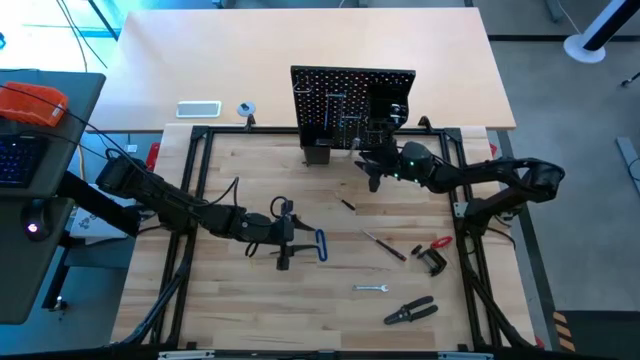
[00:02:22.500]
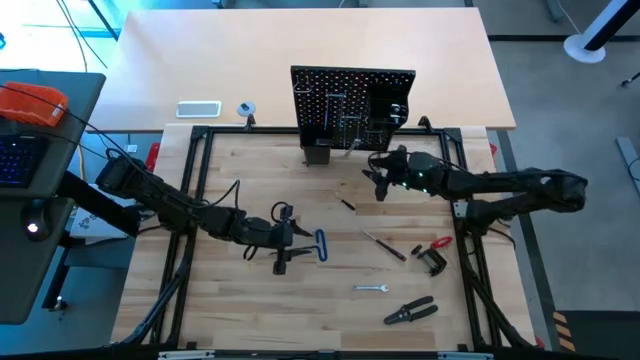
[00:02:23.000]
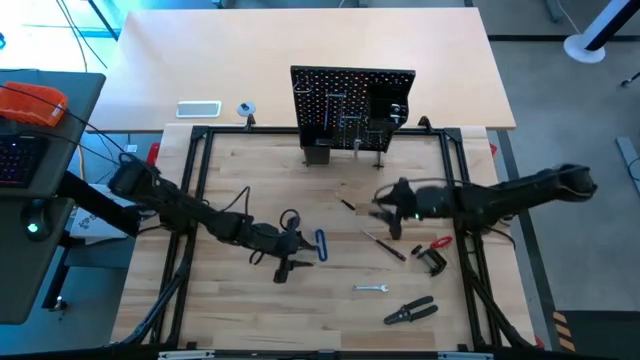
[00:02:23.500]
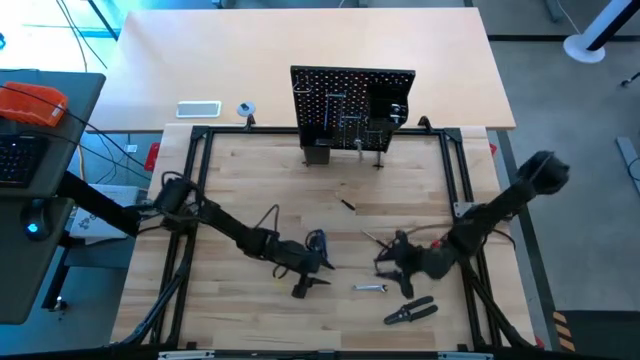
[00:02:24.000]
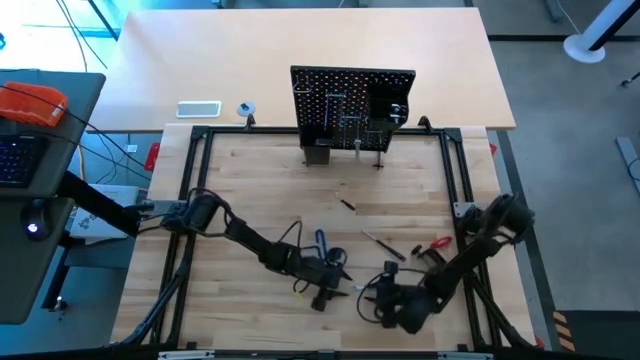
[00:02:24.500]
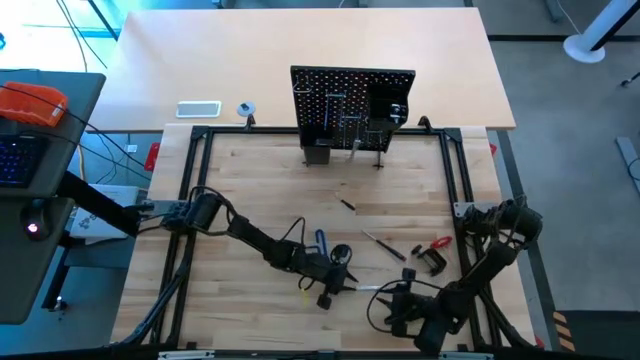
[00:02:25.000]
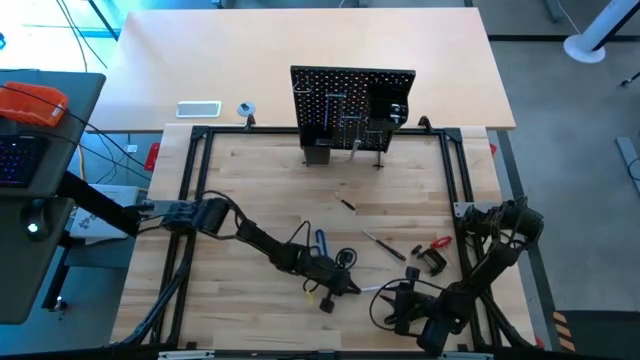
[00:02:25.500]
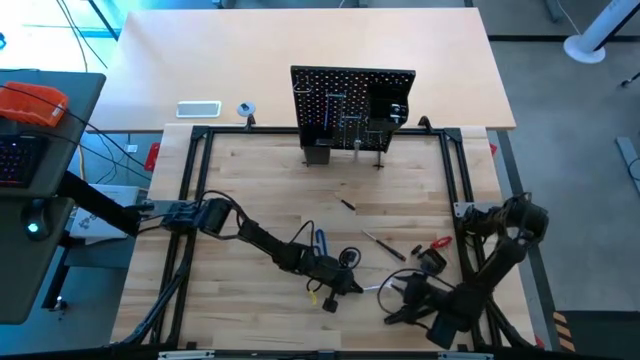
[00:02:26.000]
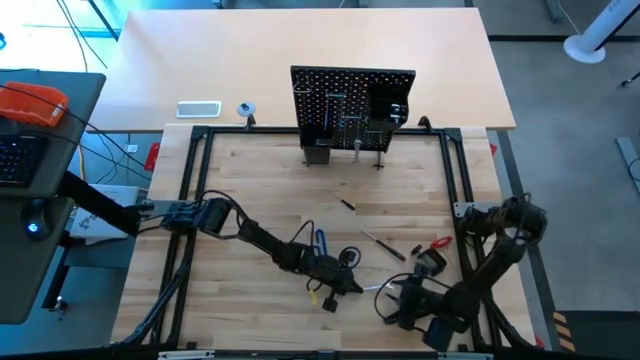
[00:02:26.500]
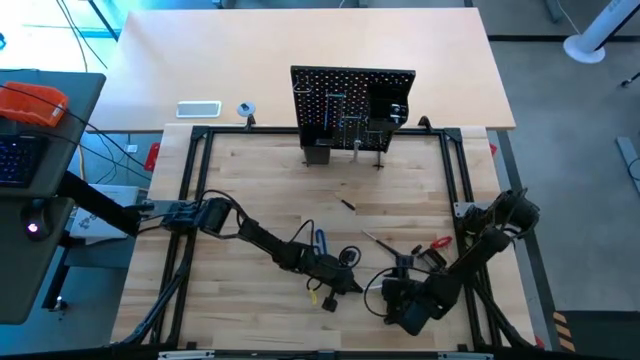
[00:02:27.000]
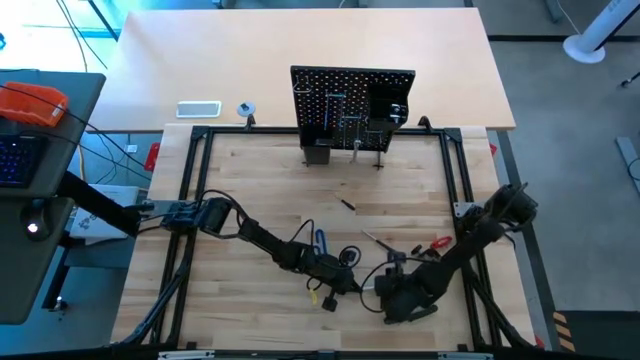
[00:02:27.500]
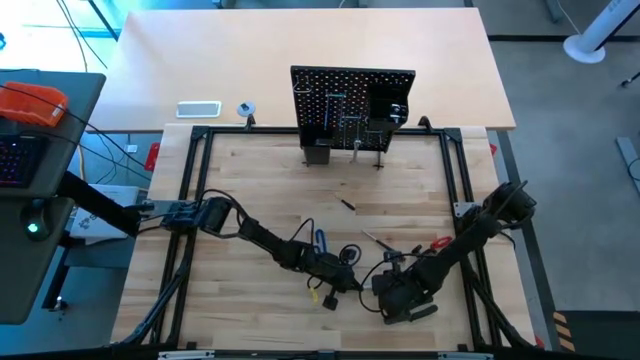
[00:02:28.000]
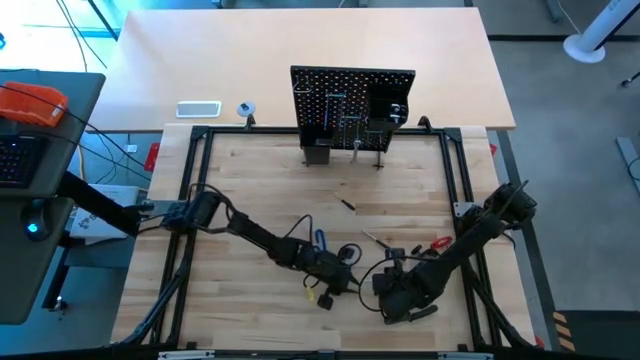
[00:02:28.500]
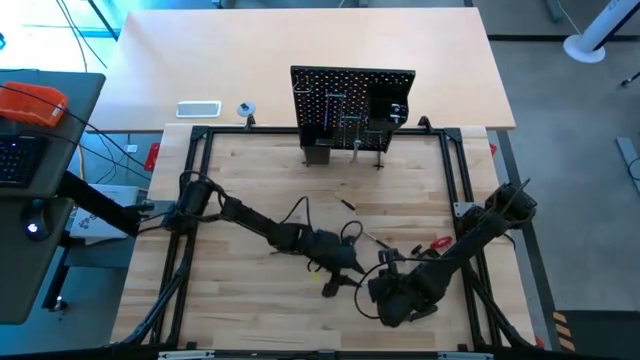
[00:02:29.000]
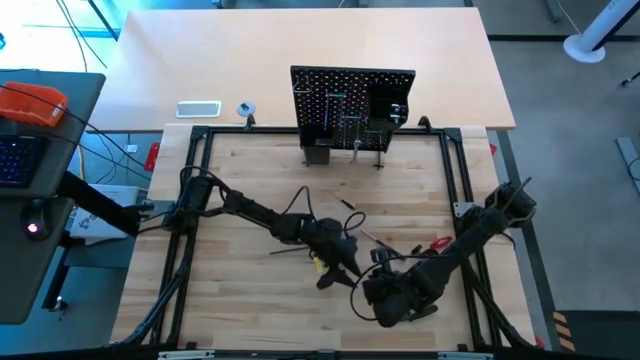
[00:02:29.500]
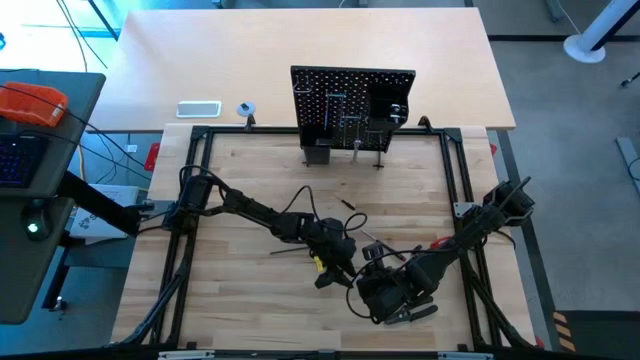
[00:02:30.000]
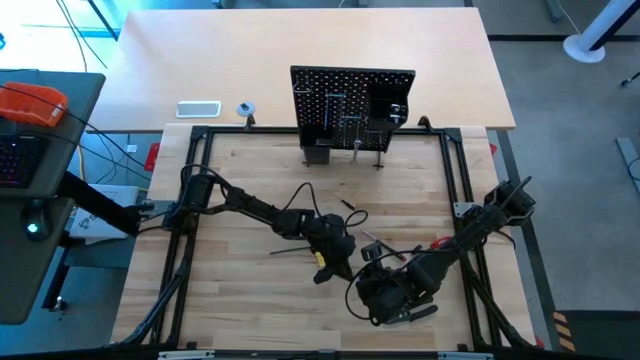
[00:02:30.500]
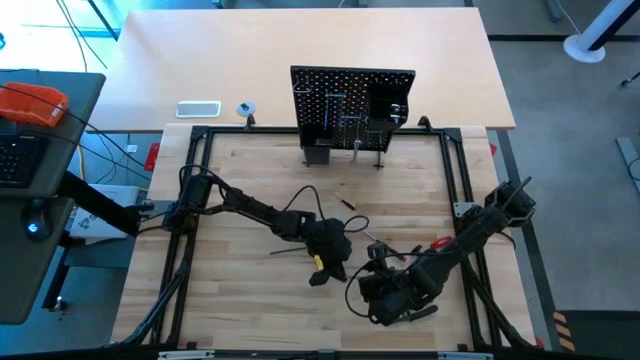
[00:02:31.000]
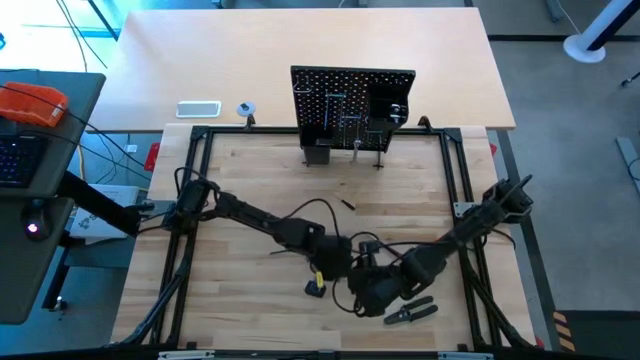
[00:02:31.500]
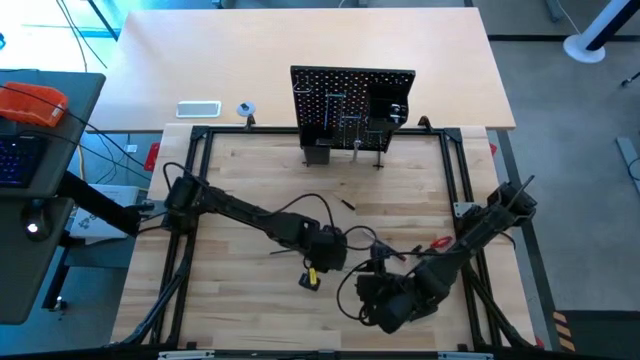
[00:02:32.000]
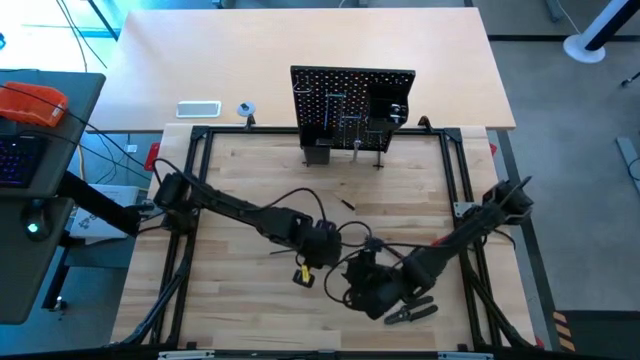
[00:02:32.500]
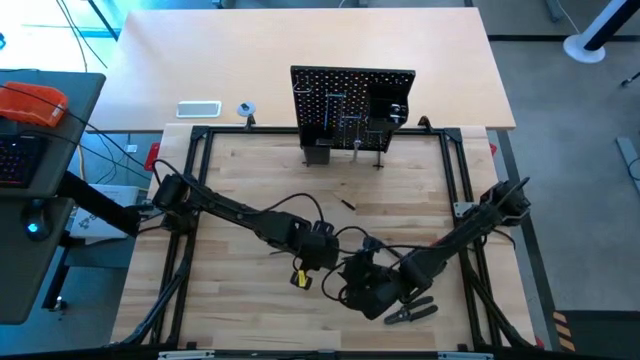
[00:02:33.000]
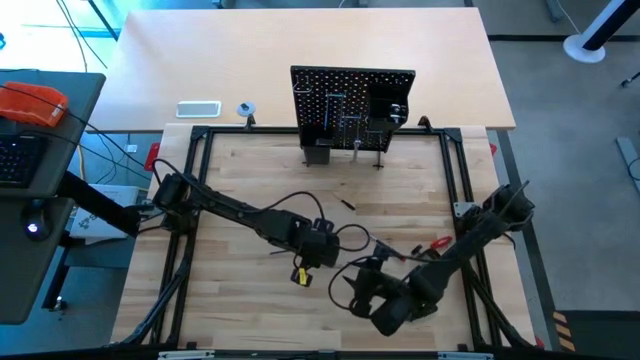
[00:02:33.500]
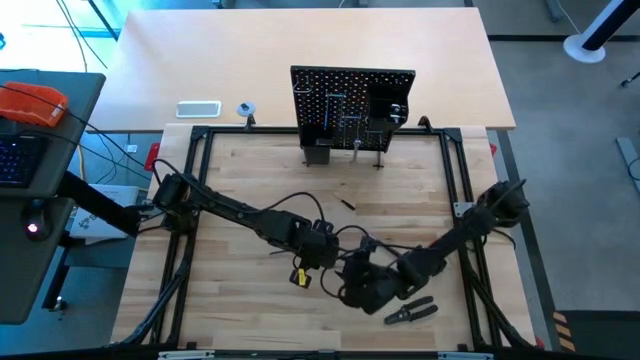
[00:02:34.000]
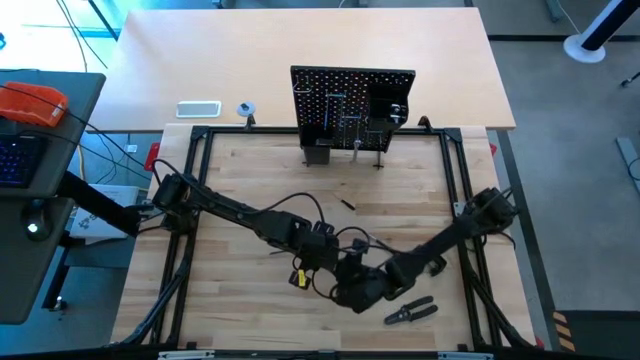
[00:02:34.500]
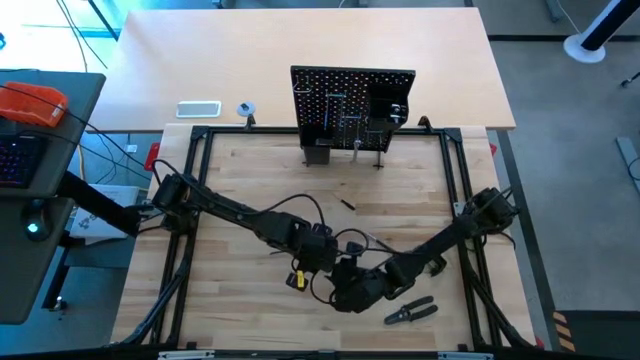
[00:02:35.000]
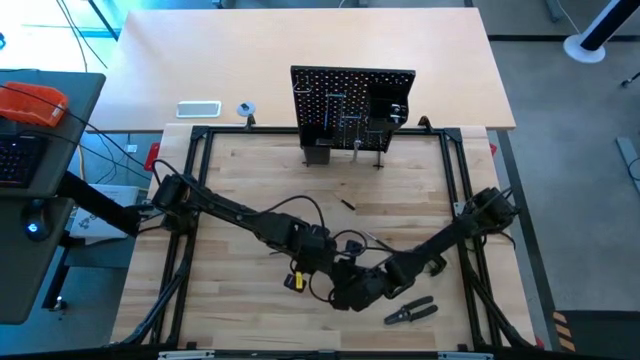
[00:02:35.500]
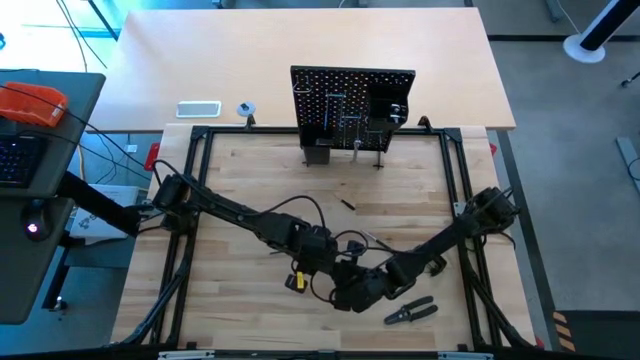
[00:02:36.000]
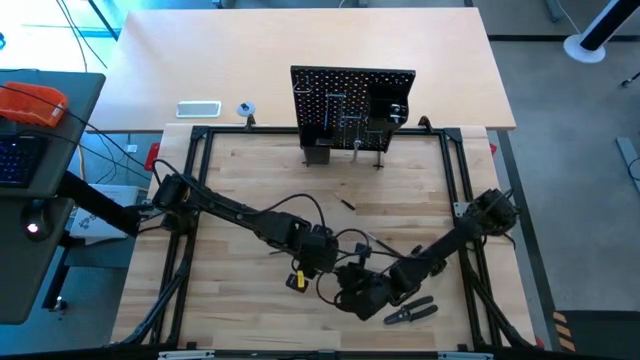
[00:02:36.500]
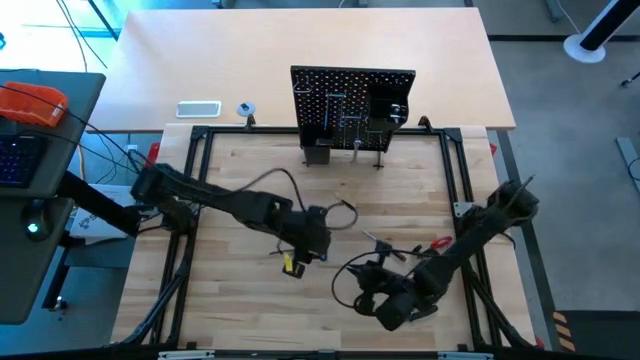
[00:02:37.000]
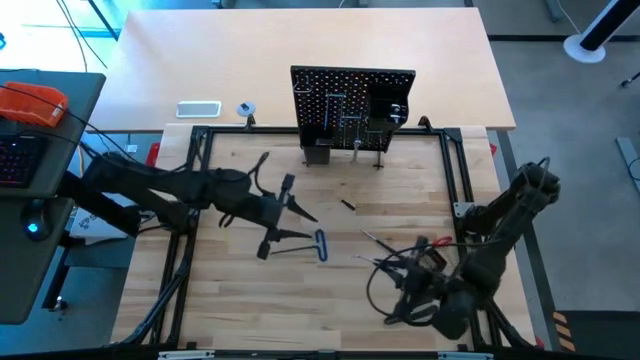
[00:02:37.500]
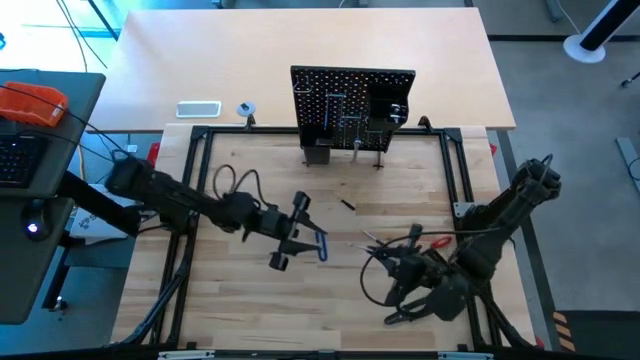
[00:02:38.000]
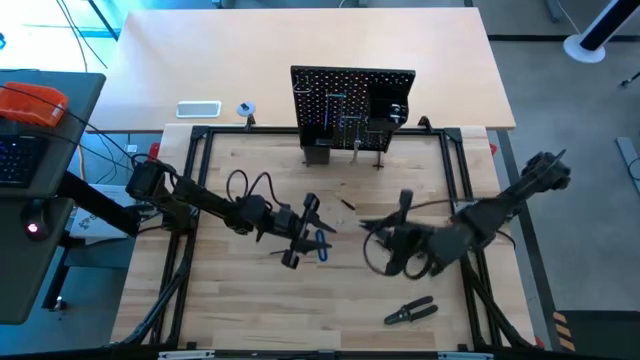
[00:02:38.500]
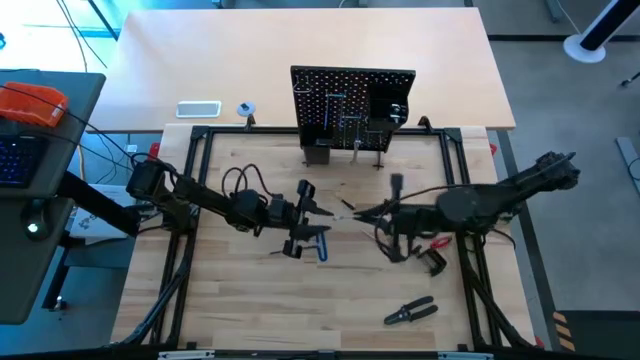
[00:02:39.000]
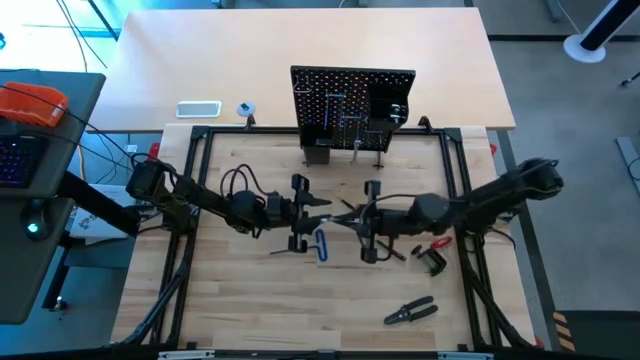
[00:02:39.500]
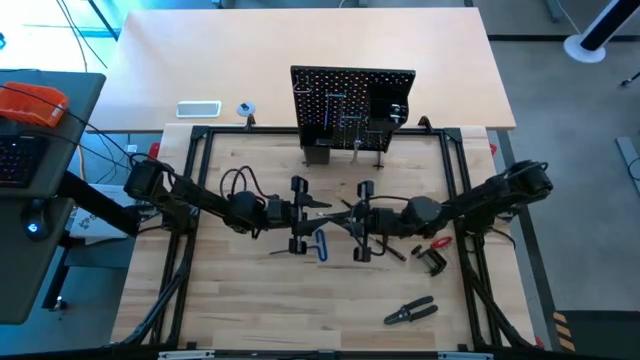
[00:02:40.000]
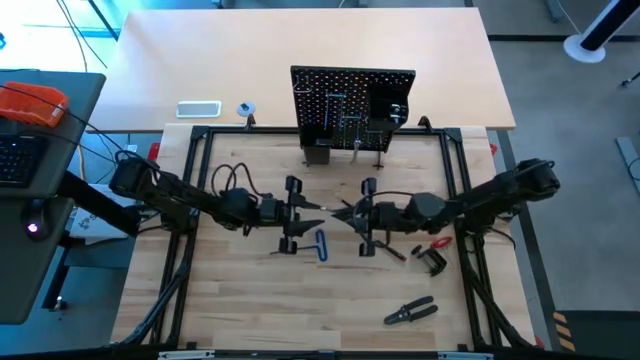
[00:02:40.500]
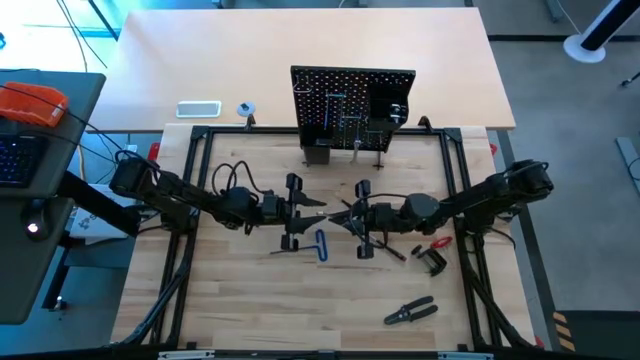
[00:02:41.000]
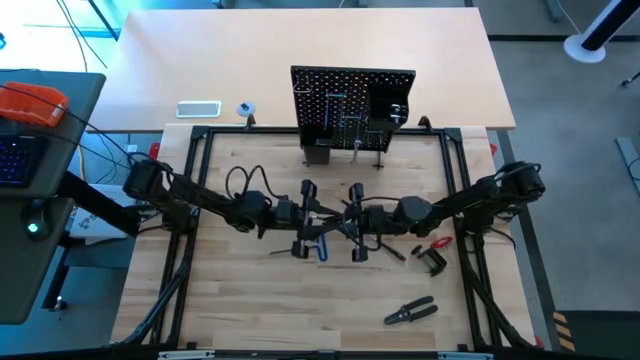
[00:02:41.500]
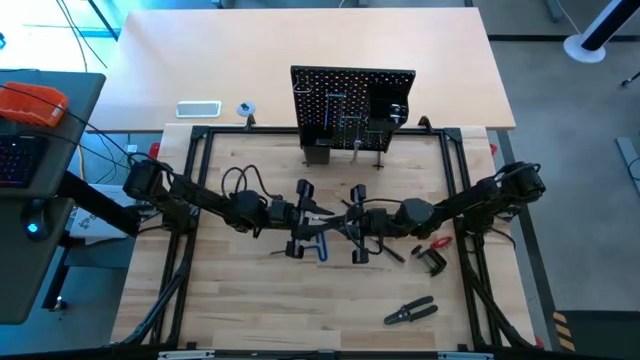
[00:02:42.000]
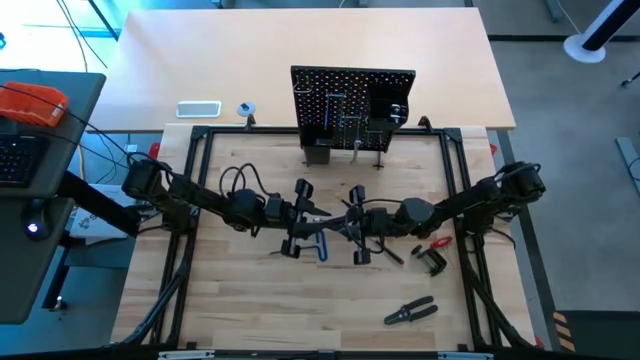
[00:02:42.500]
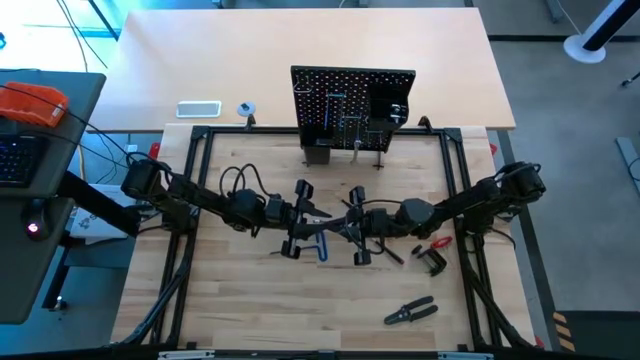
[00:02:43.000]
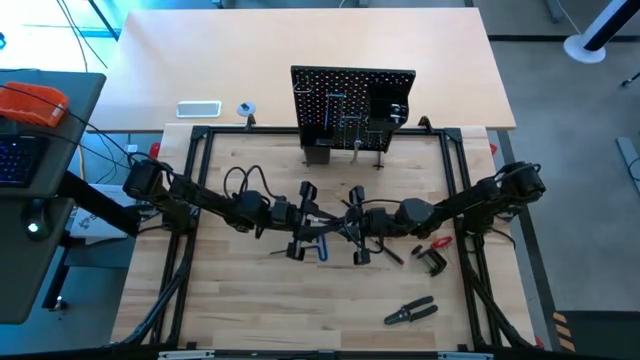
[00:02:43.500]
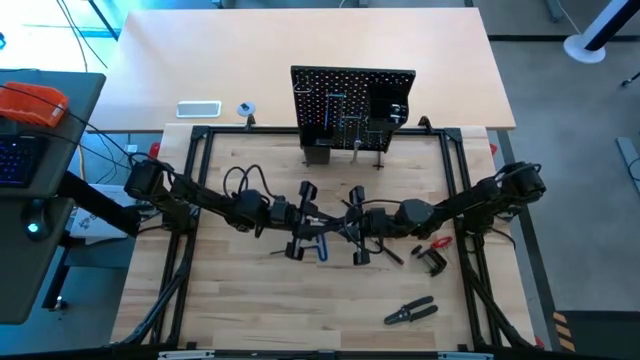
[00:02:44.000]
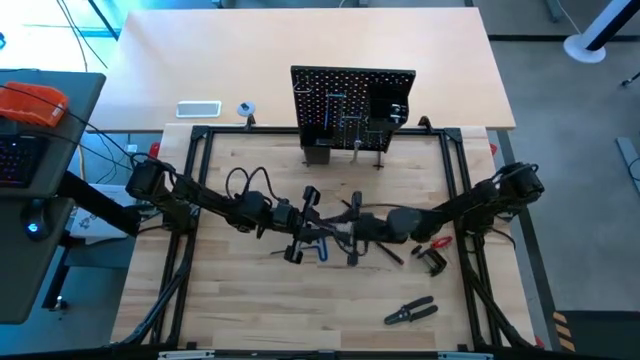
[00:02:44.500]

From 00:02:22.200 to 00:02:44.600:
Task: Hang tools onto peg board
Hang the wrench on the pegboard
